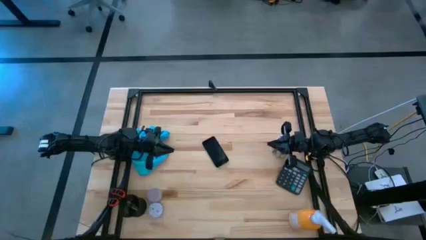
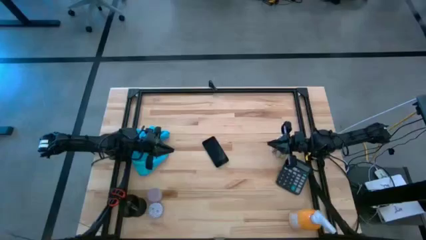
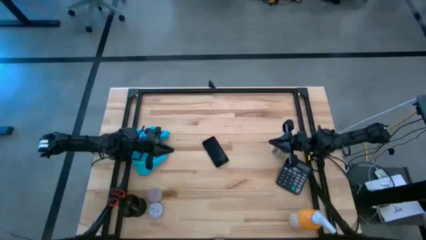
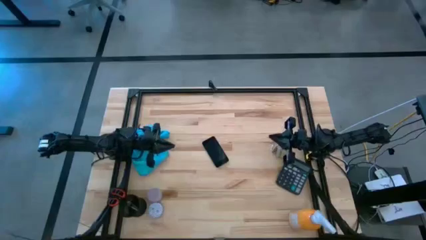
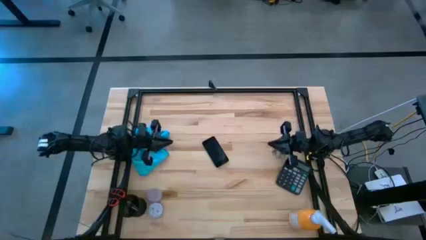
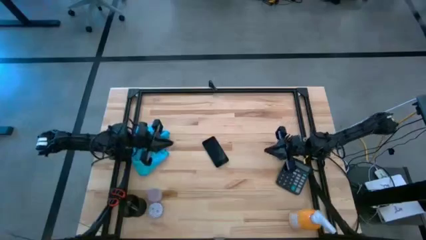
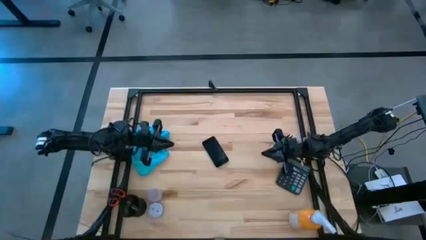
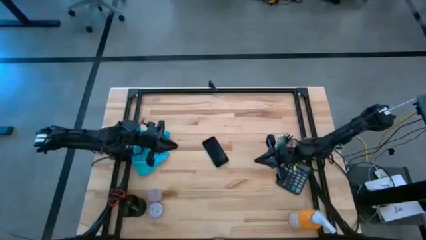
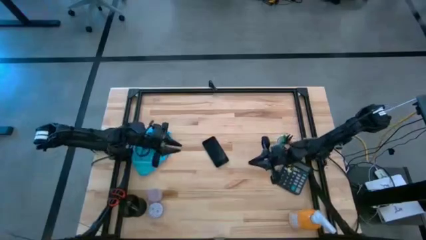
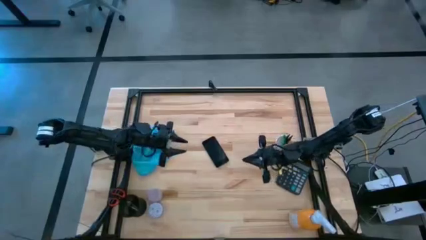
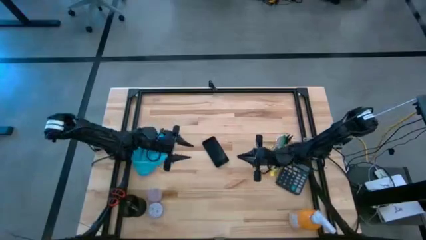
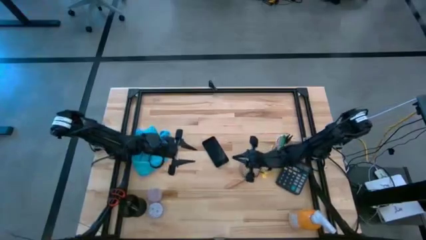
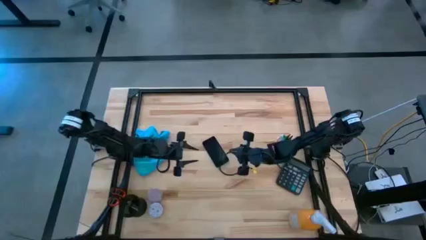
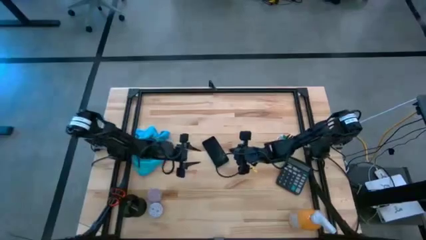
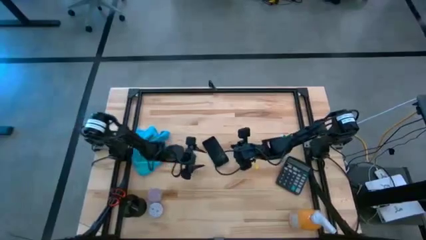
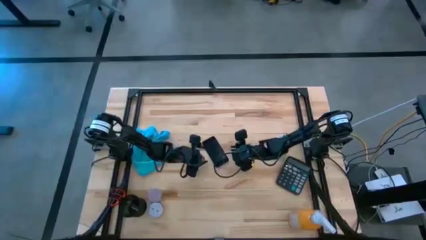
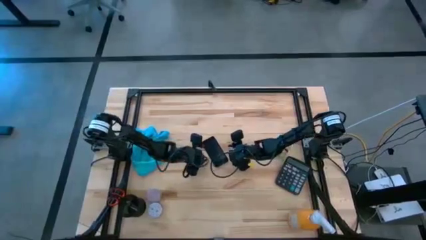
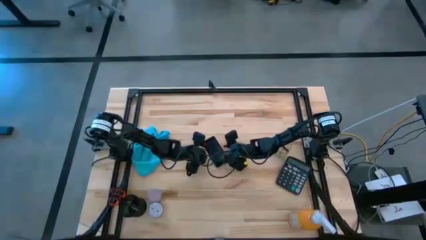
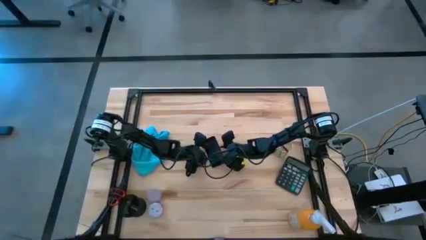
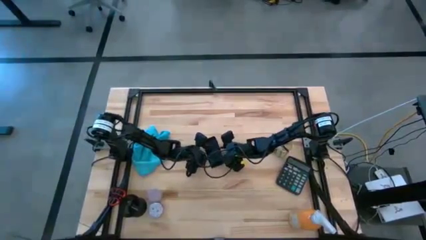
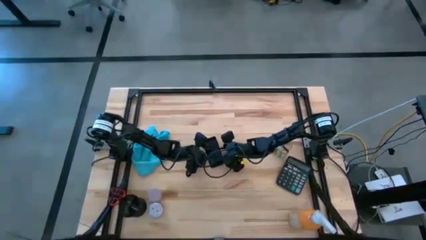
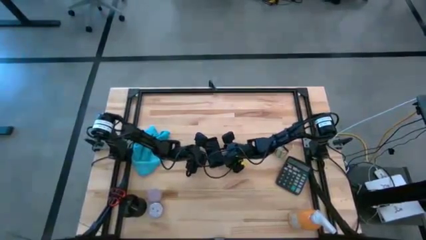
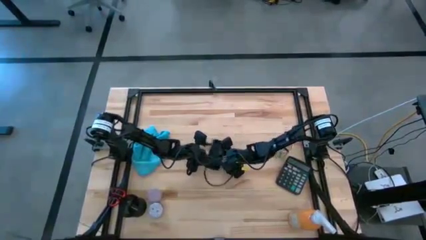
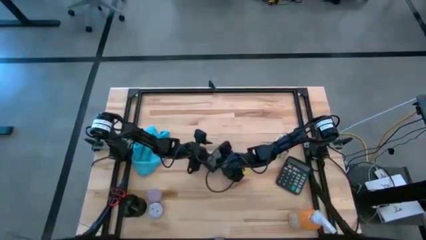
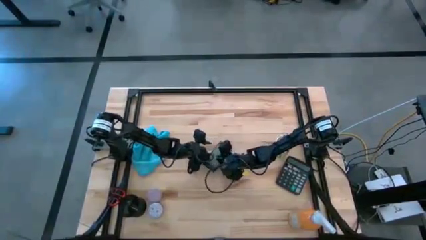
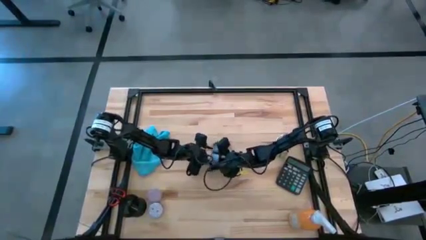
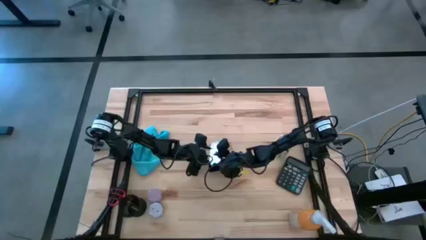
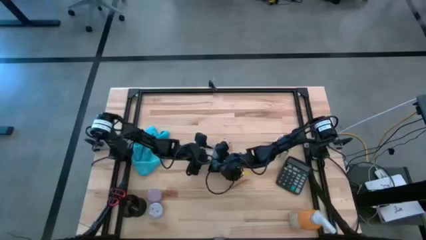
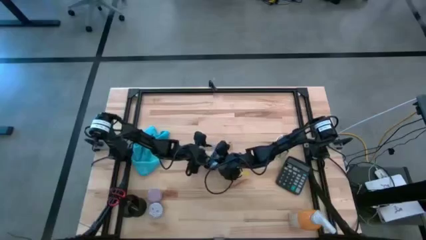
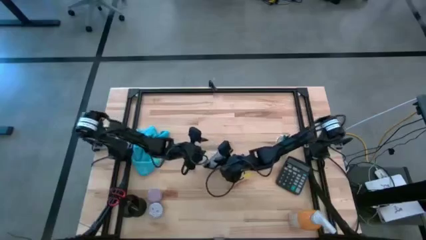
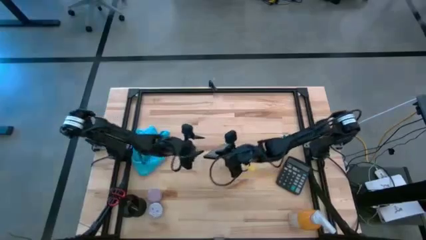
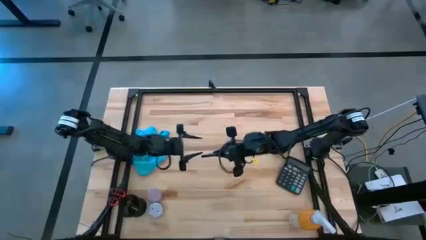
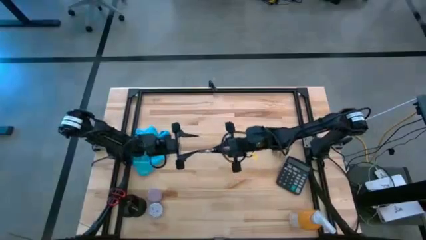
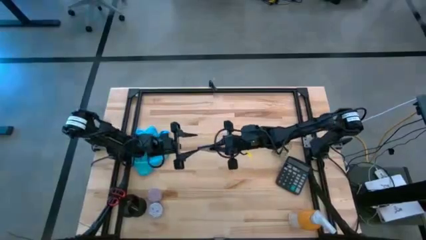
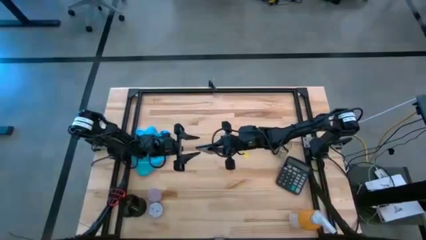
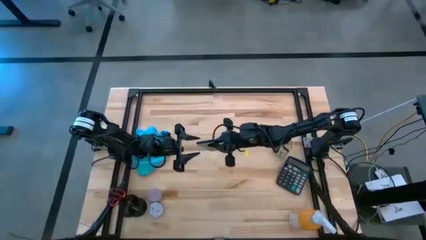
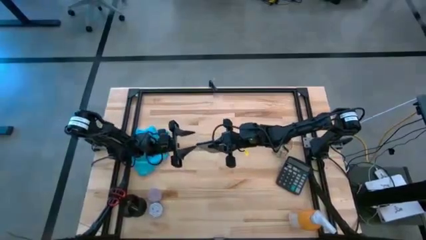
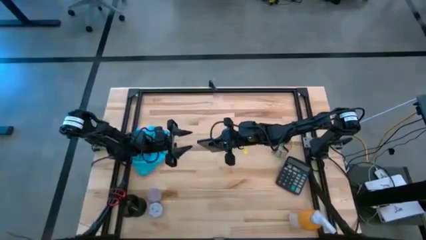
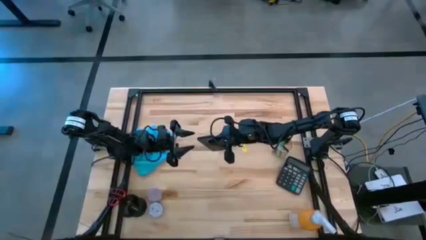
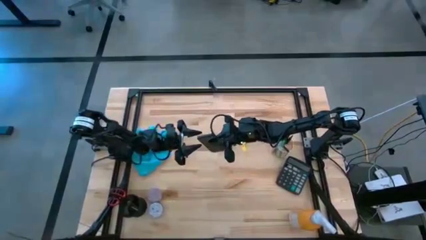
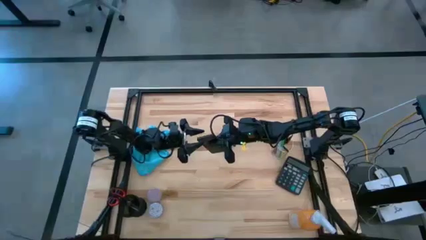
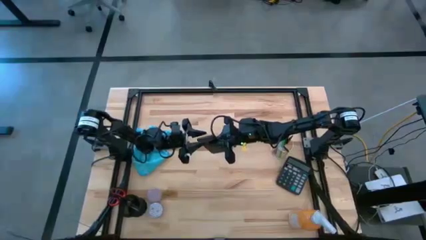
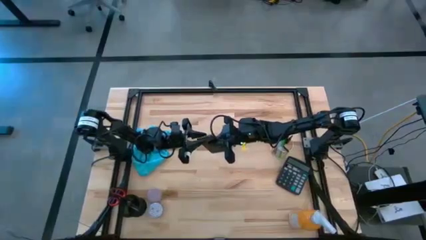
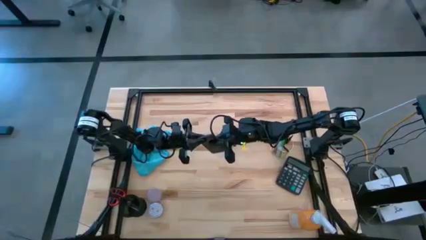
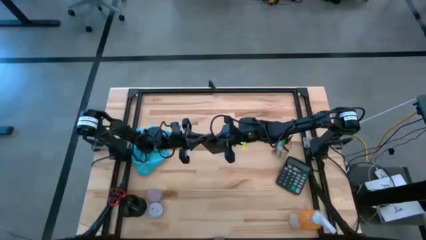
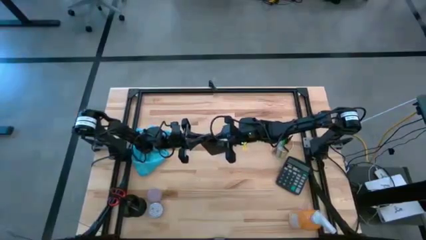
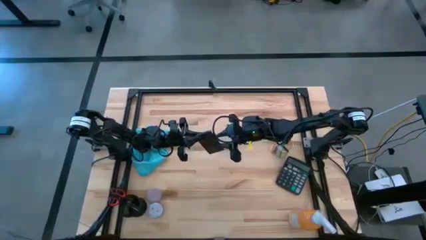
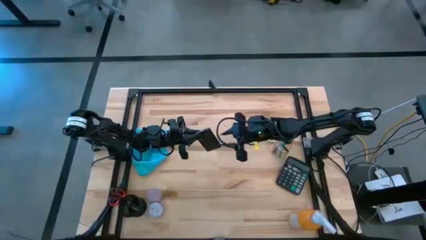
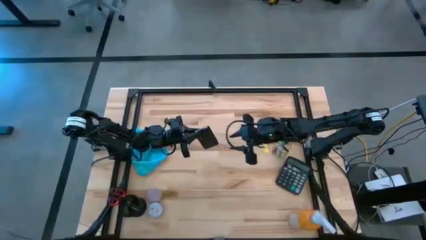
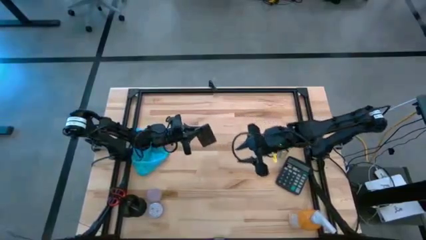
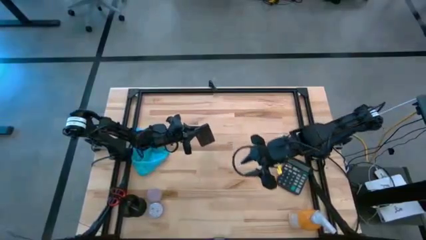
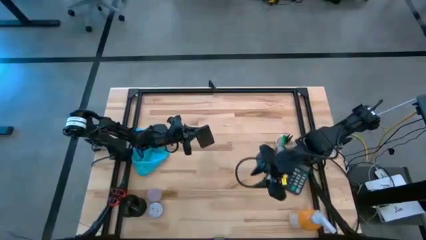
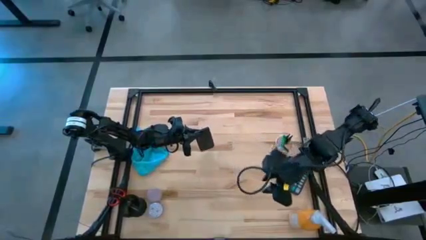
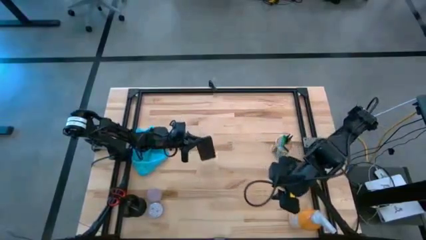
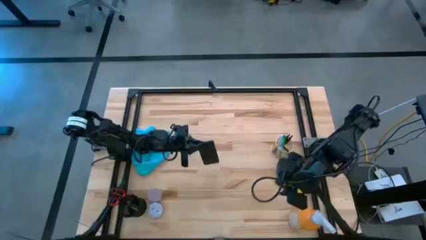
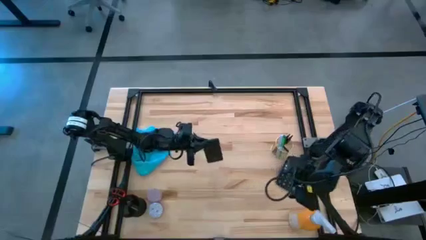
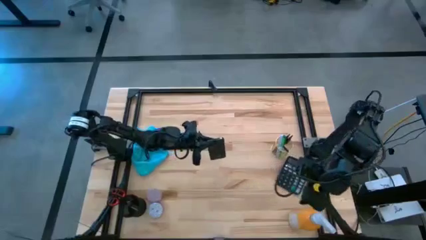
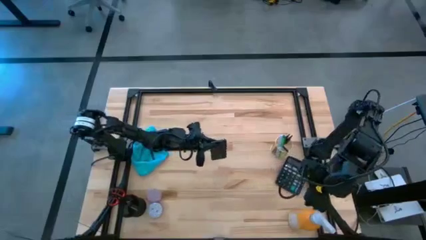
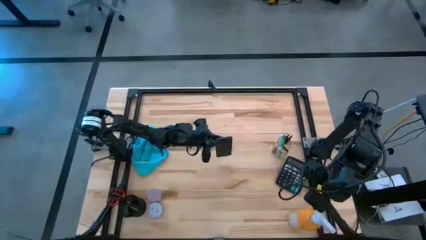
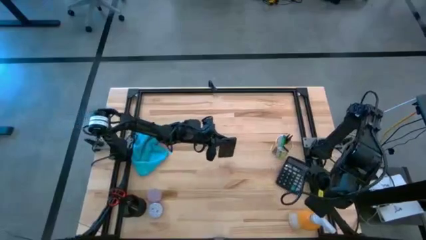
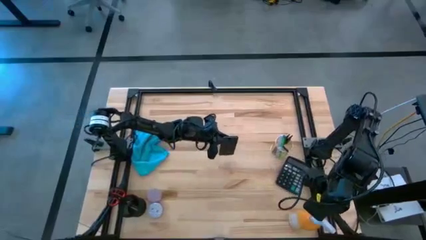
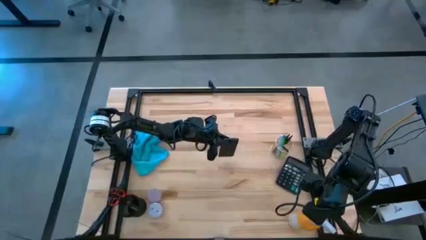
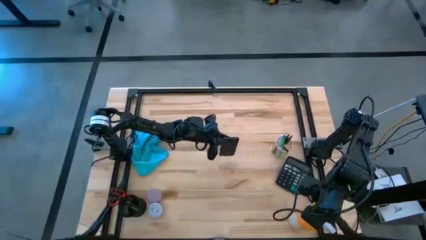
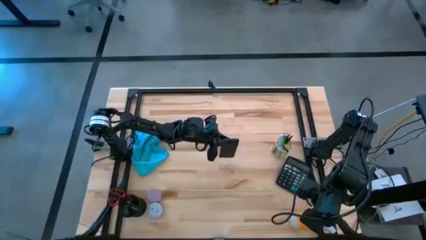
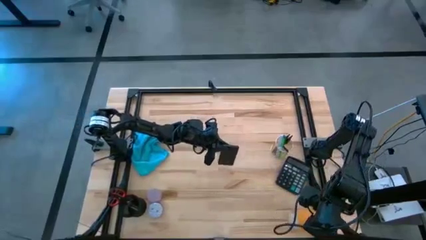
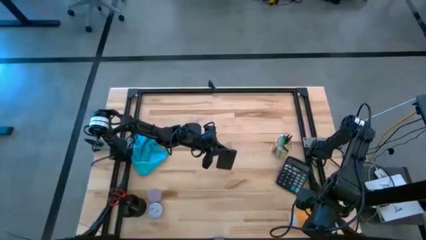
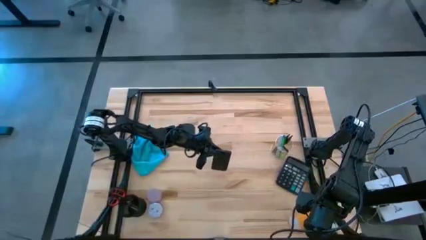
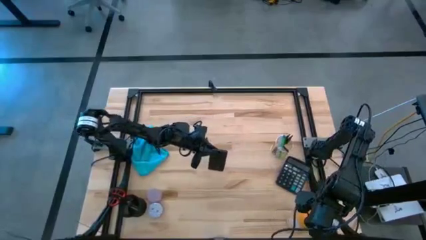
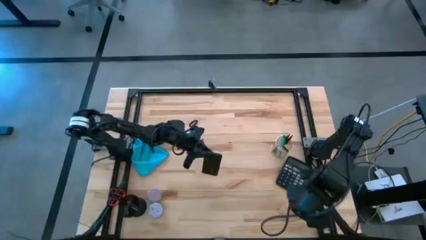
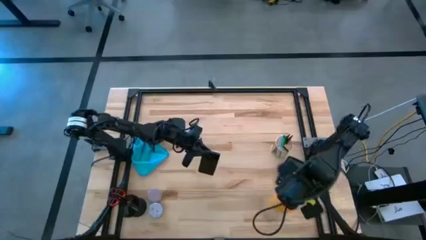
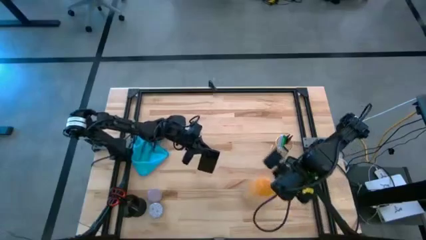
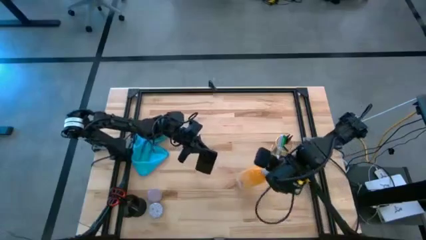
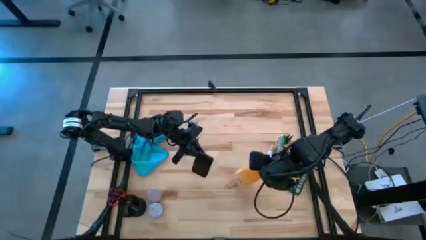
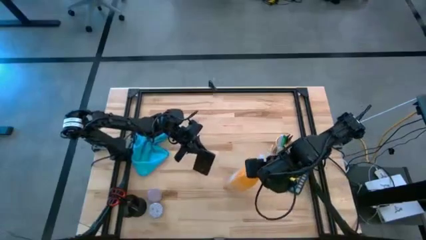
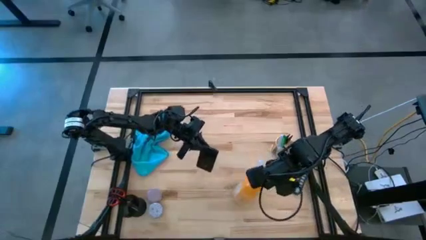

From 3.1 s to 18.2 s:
Task: Apply microfiber cloth
Spray the front and back of the black cellphone using the orange spray bottle
